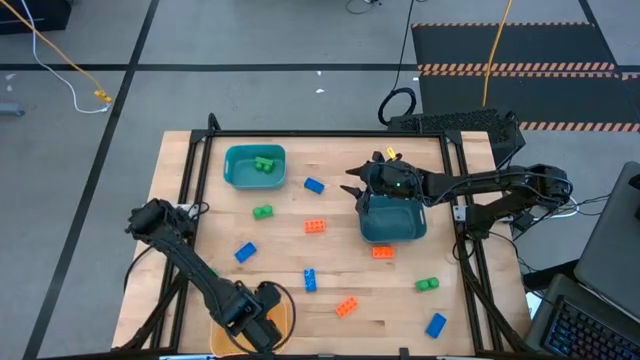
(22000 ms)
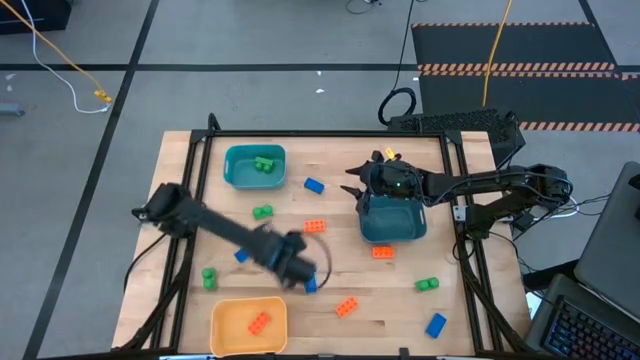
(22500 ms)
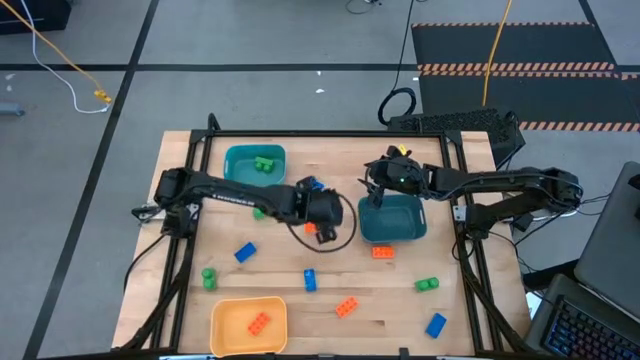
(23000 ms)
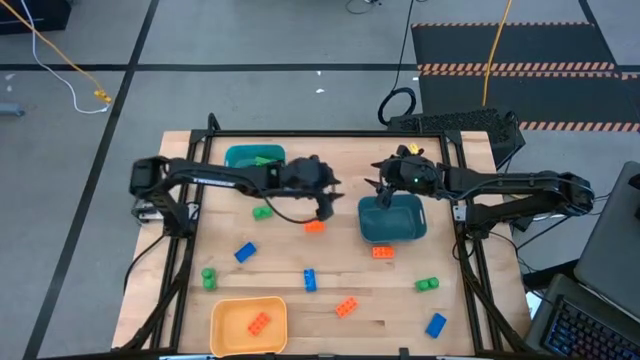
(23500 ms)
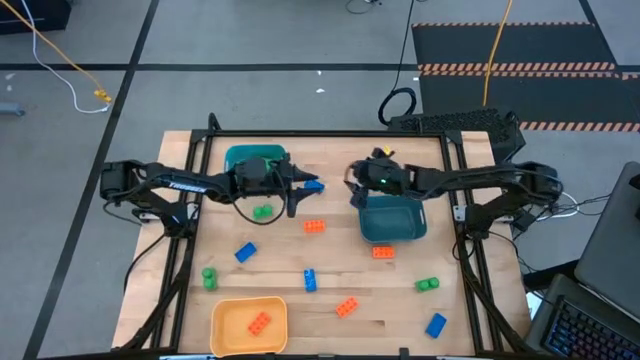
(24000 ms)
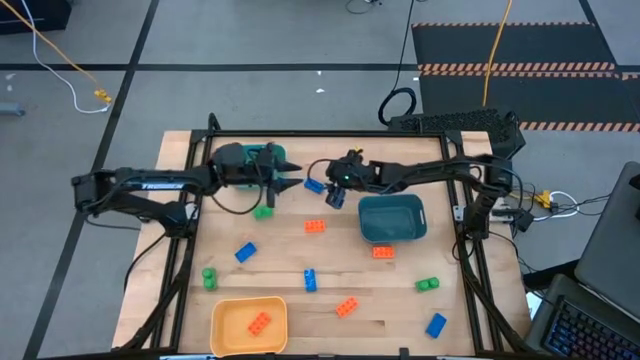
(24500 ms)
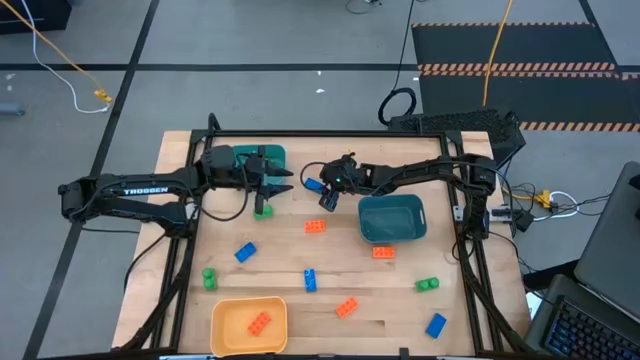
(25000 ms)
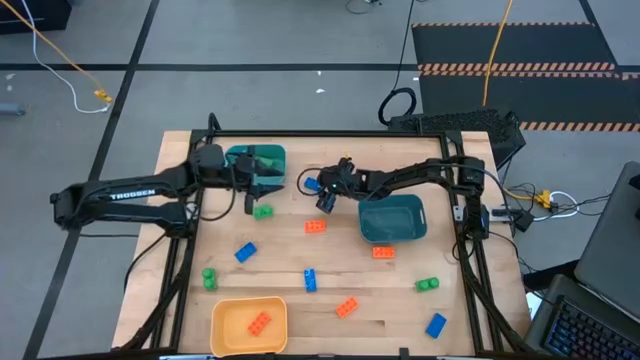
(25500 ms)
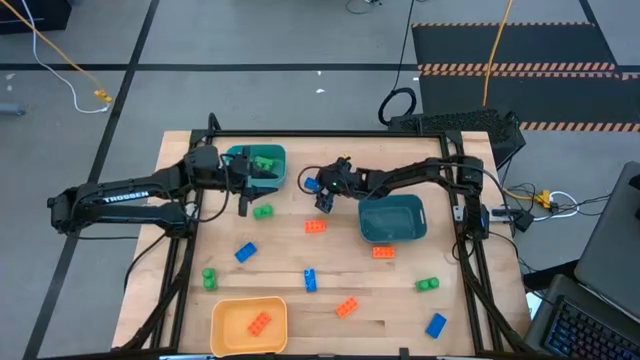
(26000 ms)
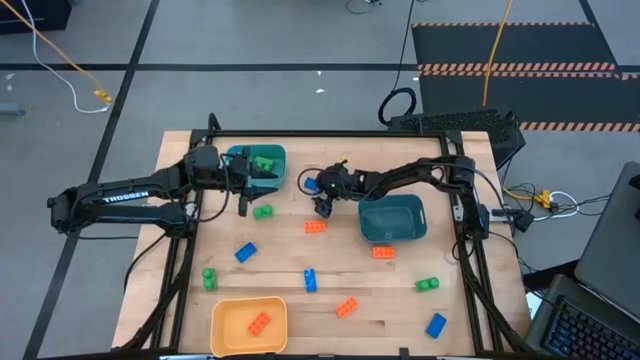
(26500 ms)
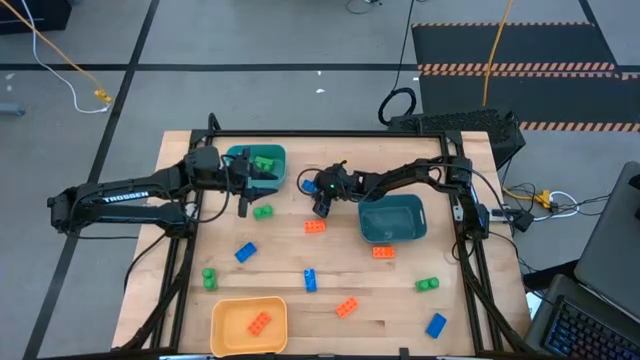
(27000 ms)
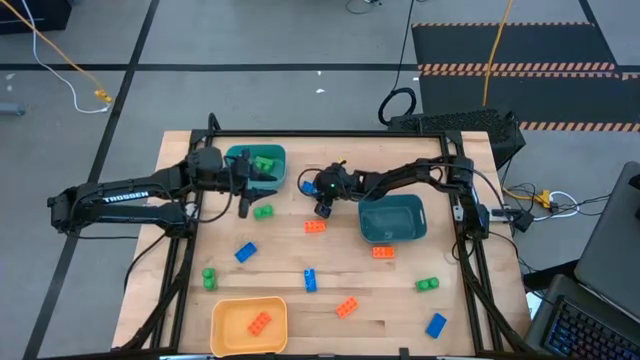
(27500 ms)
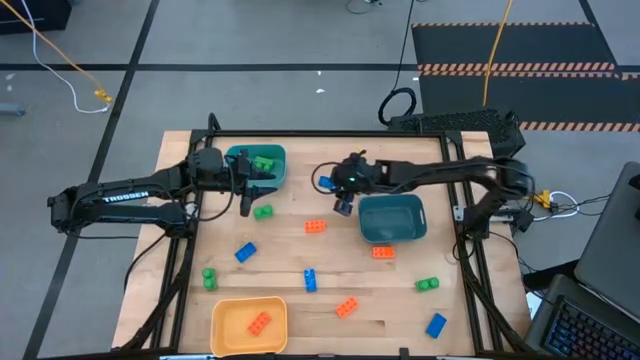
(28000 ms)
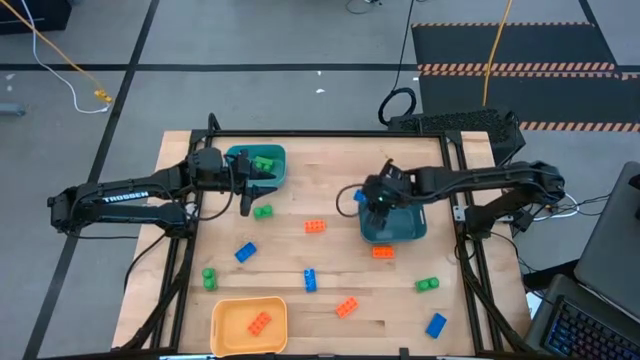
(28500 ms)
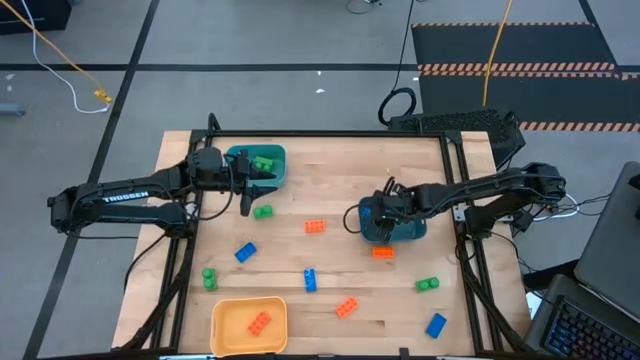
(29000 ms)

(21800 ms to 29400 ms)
Task: Sort & place blocks by color
Put the blue game piece into the dark blue bin

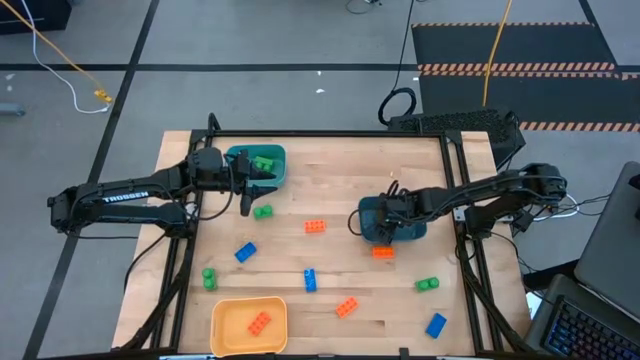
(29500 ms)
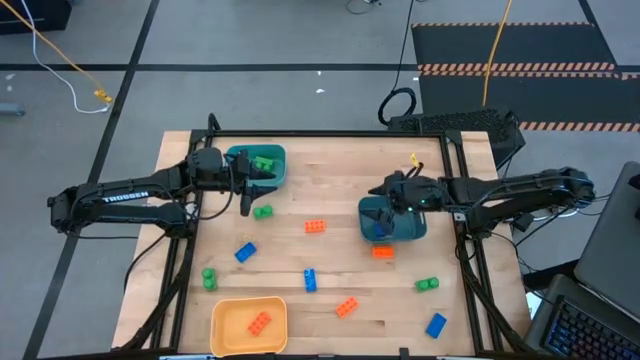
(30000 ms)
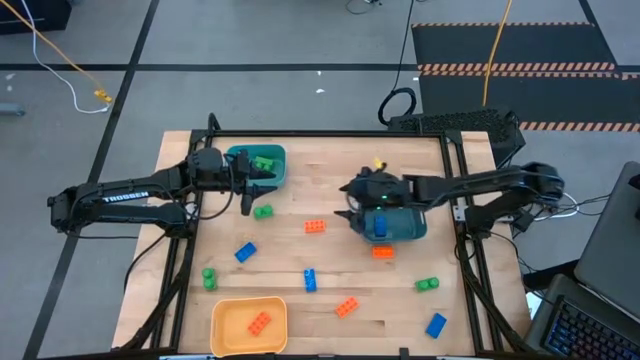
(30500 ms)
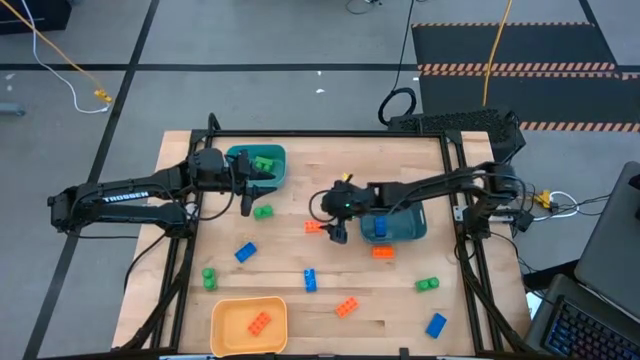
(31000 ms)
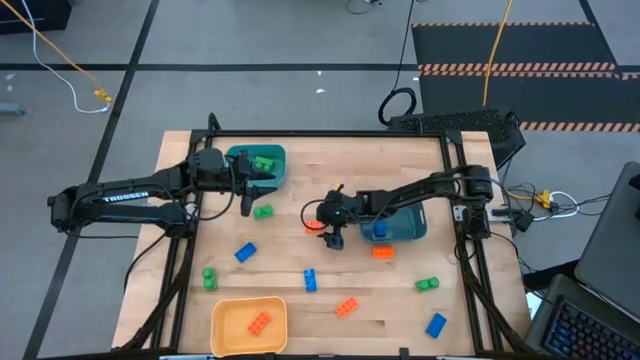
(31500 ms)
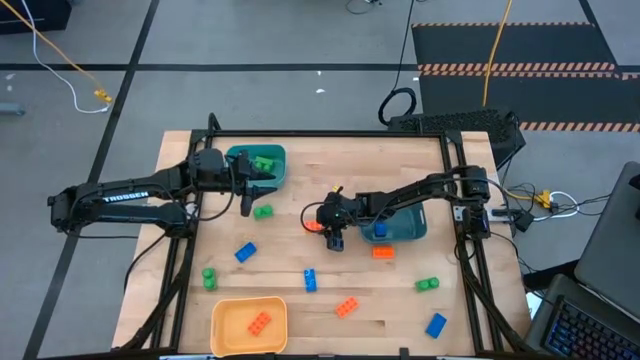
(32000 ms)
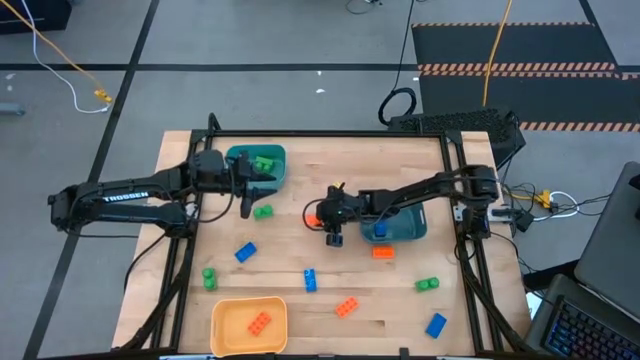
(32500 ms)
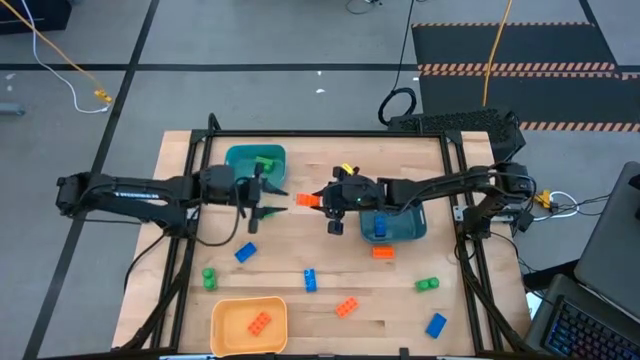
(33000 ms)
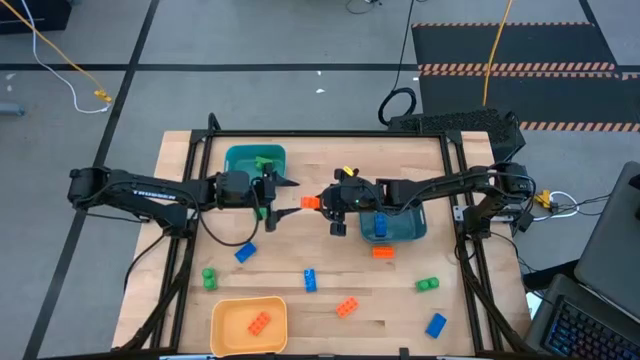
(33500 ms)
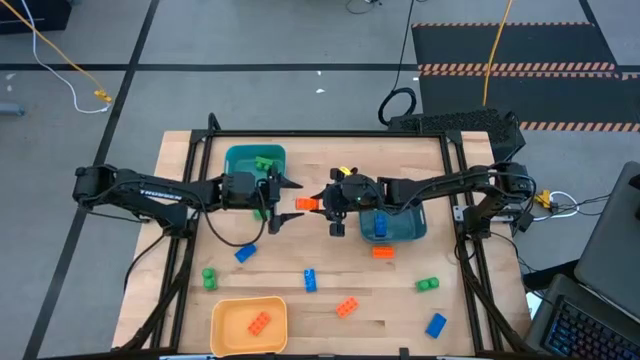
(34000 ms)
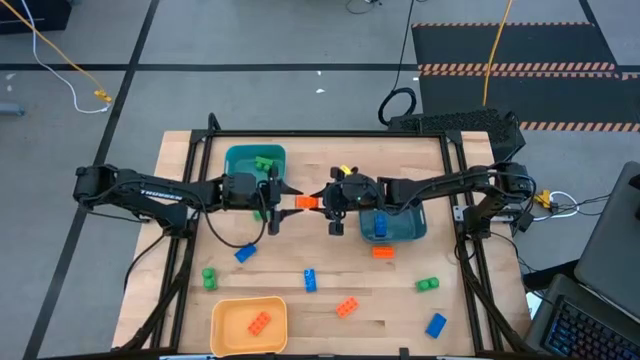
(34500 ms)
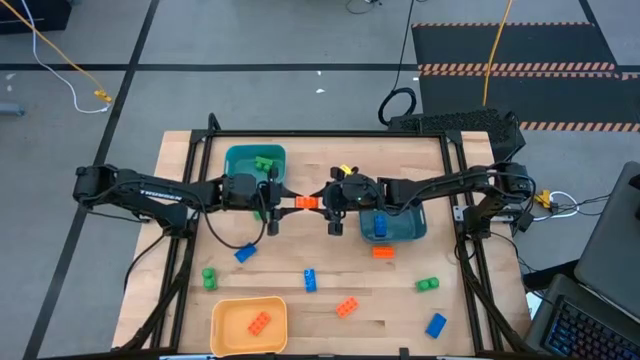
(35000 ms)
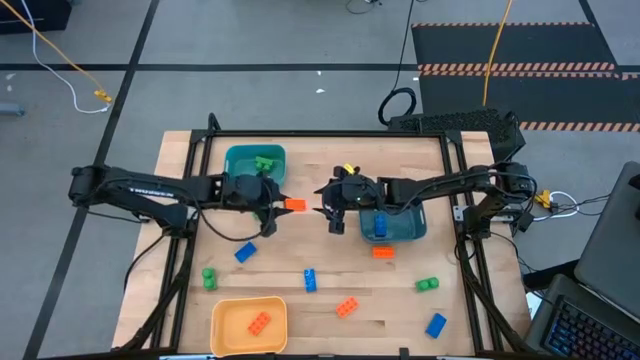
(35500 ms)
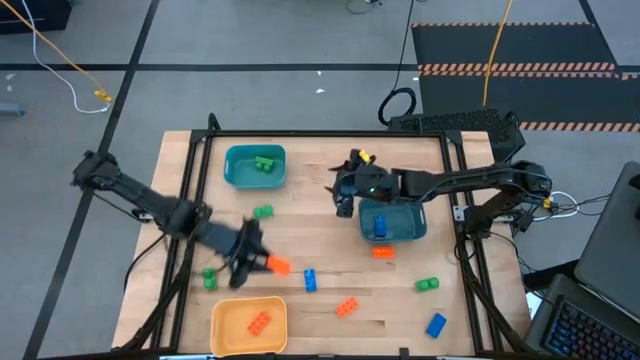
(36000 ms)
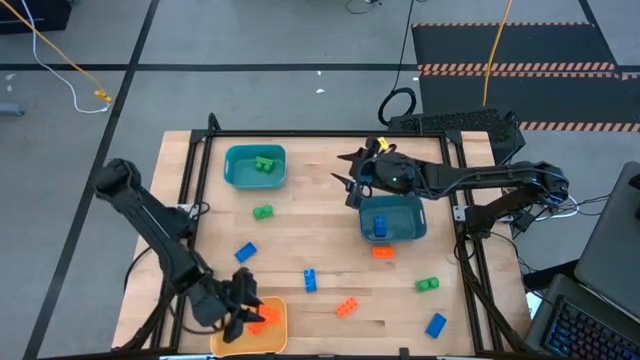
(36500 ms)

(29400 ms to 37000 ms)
Put the orange game piece into the yellow bin

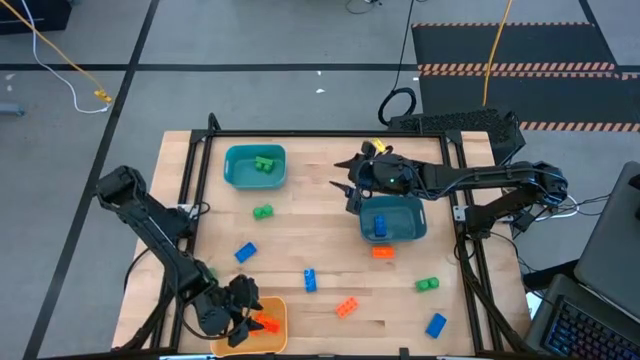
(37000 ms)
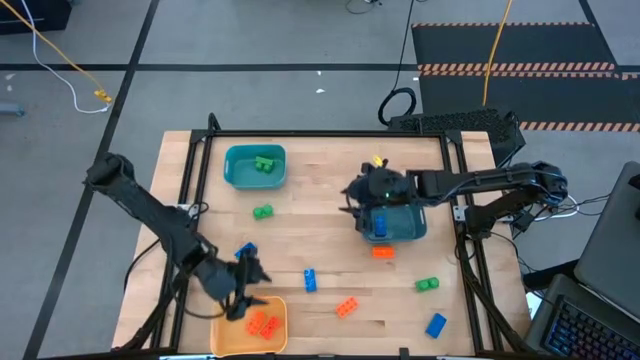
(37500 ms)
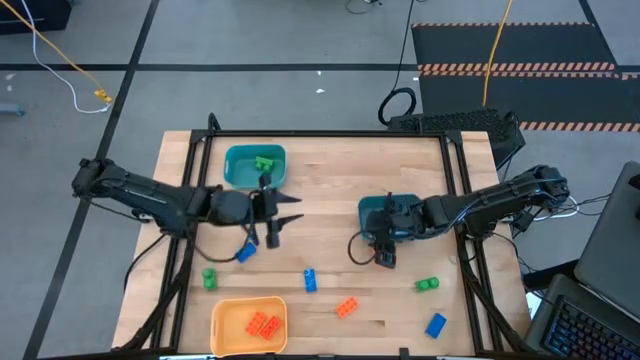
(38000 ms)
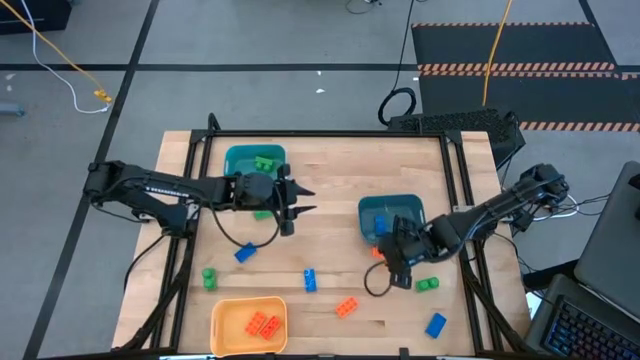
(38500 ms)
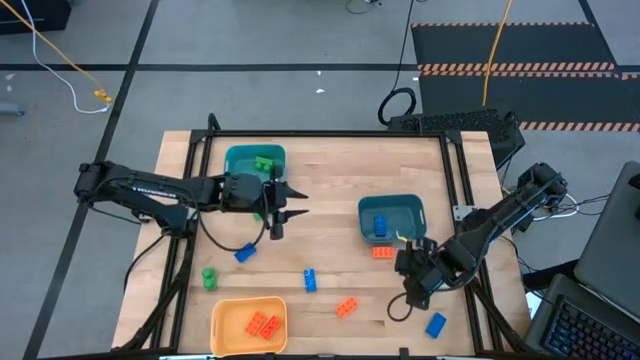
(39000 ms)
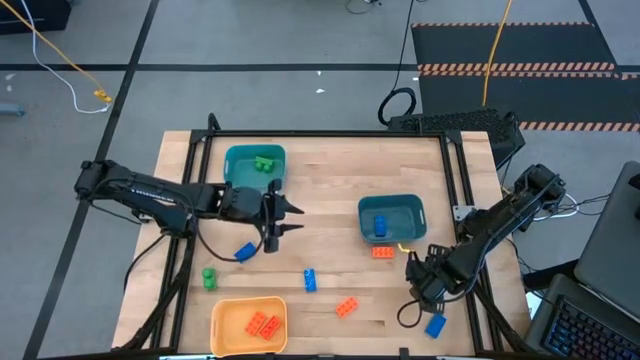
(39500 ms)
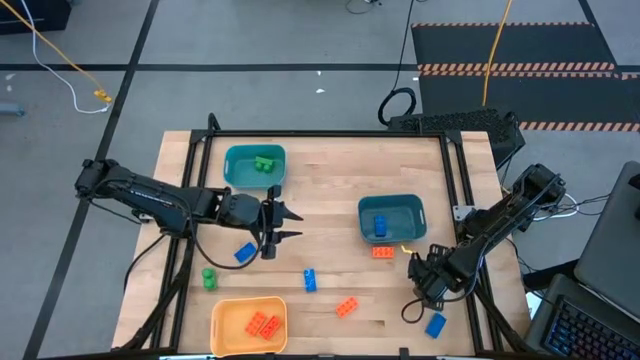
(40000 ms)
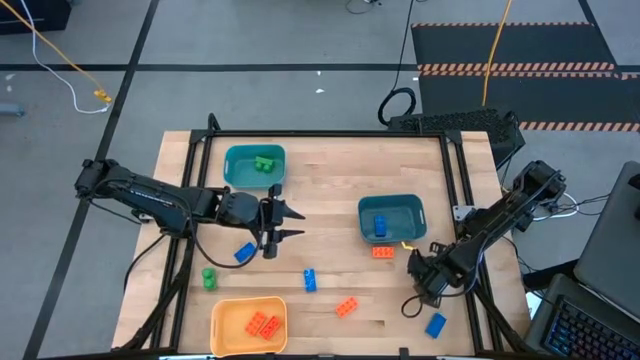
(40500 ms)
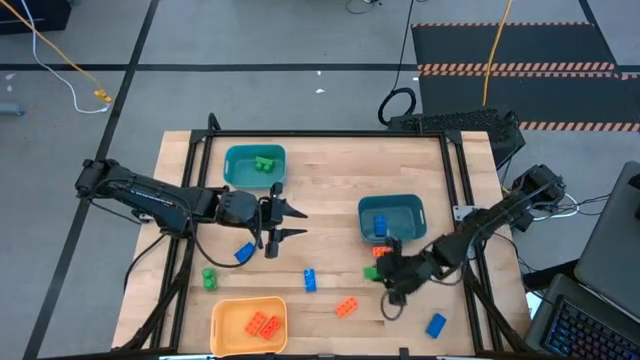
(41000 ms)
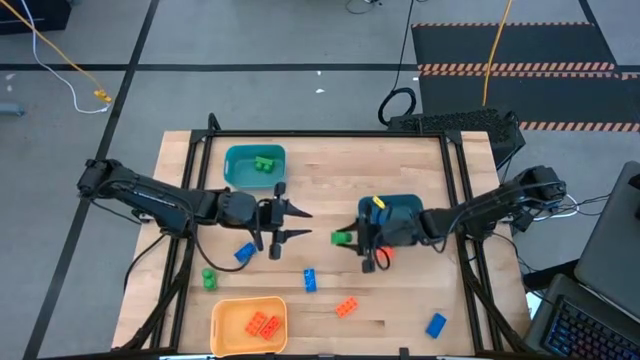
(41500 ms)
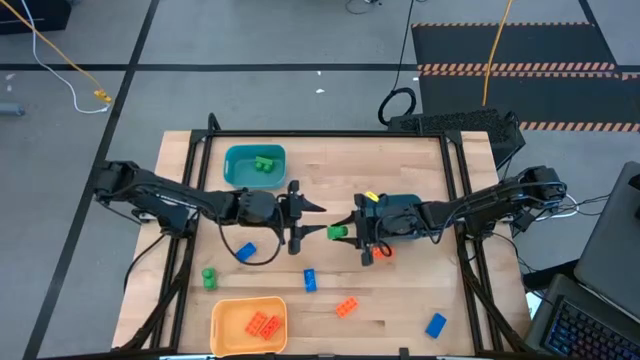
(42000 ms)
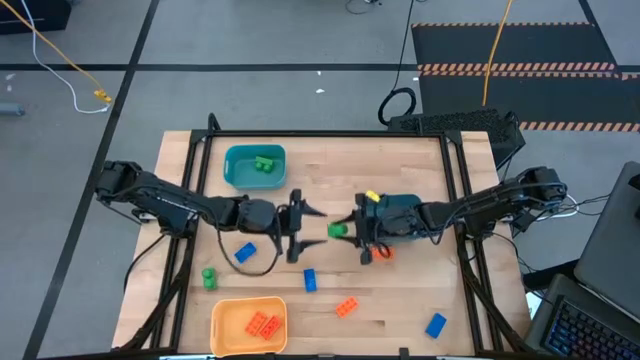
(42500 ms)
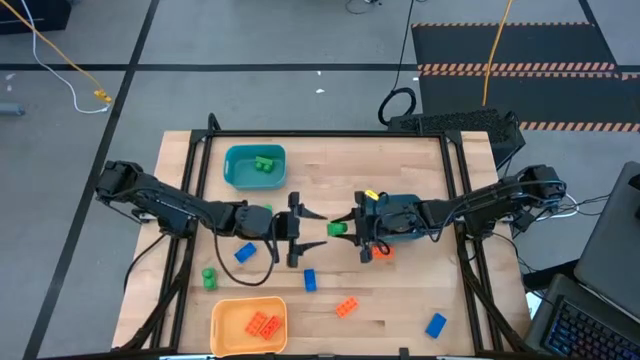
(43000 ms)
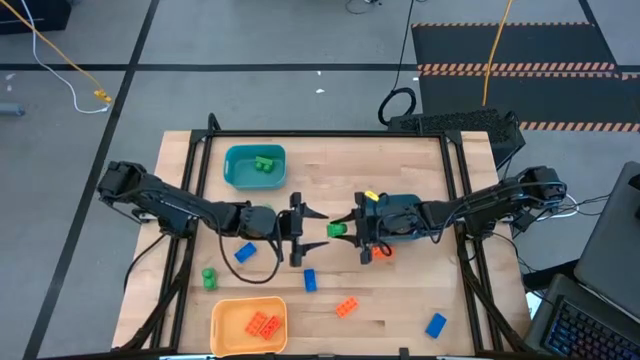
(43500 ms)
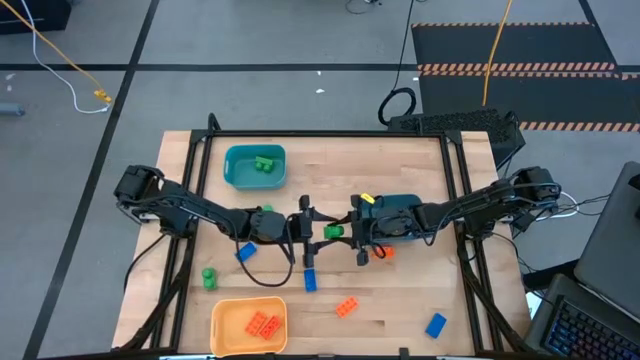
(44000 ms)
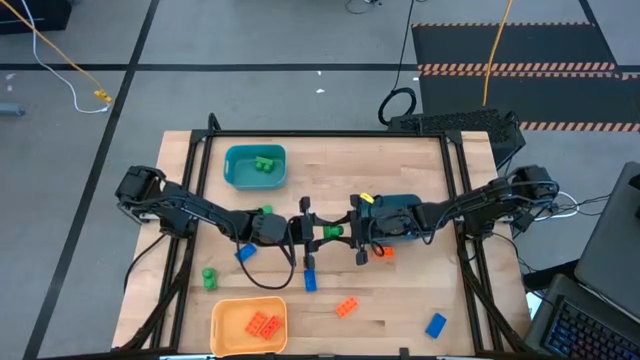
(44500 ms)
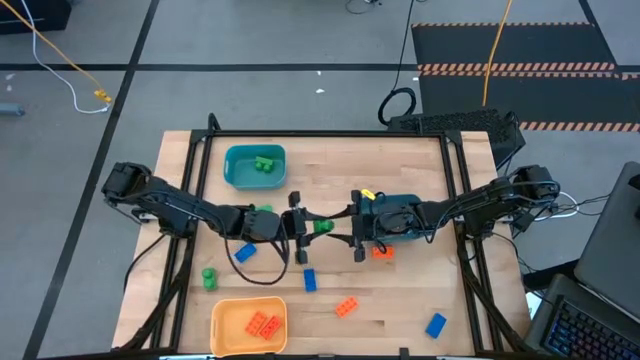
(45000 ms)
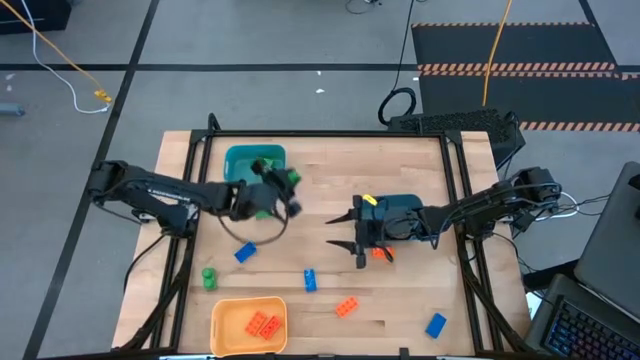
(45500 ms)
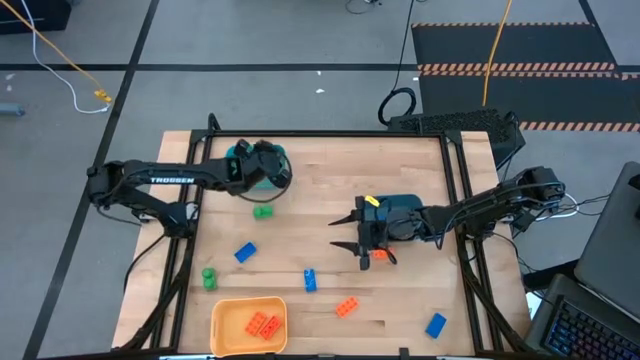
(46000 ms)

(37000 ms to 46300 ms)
Put the green game piece into the light blue bin
